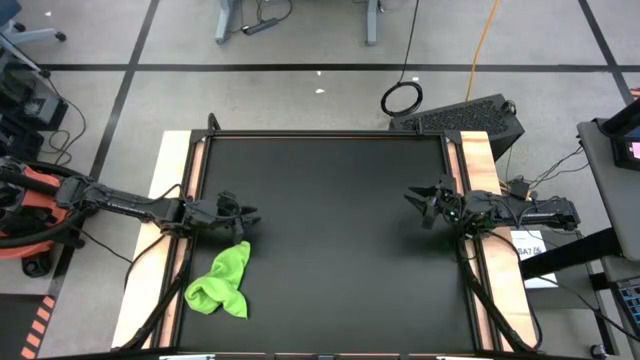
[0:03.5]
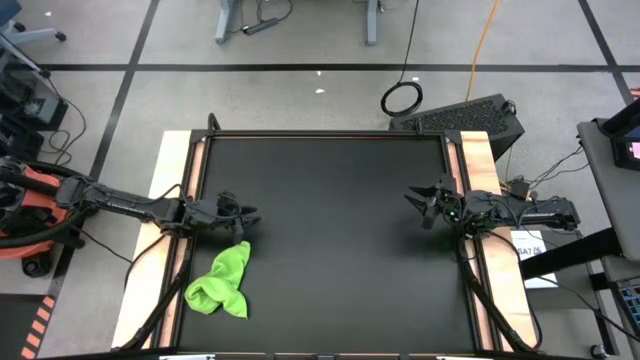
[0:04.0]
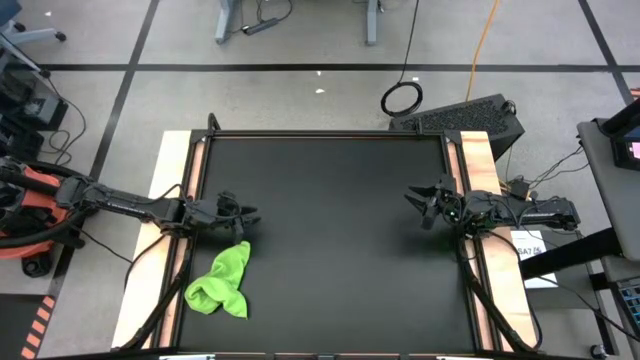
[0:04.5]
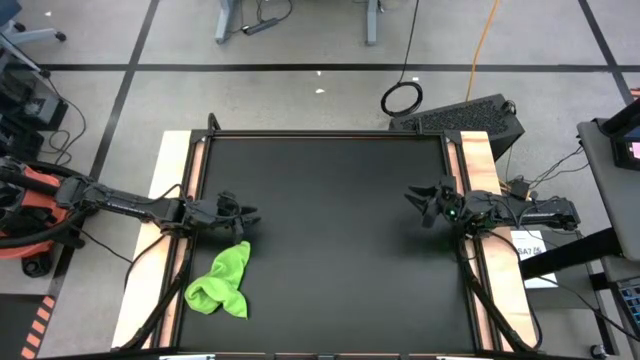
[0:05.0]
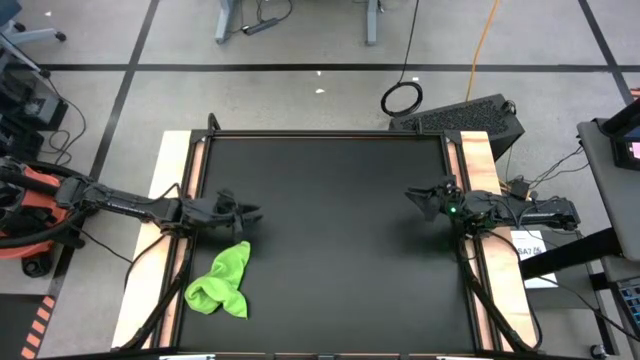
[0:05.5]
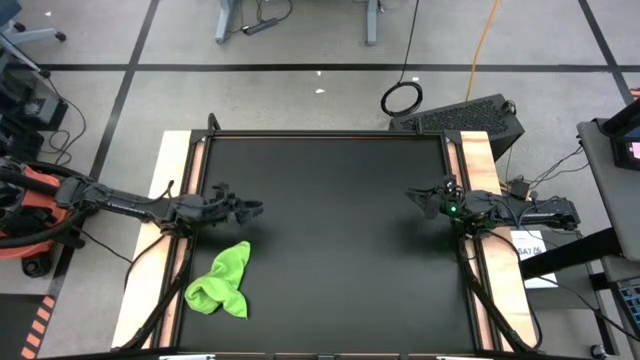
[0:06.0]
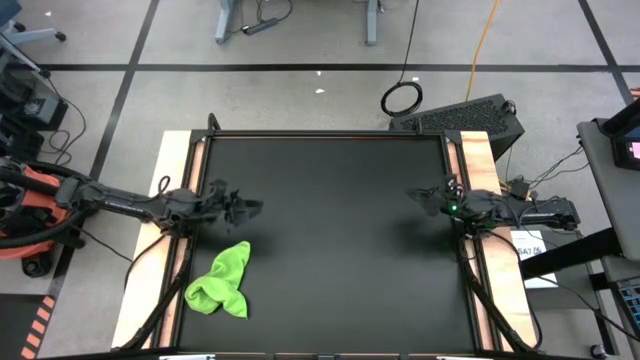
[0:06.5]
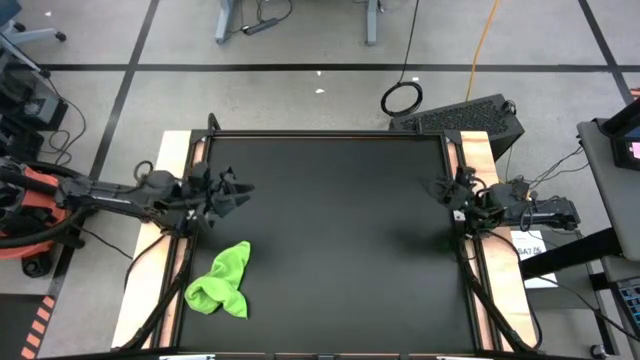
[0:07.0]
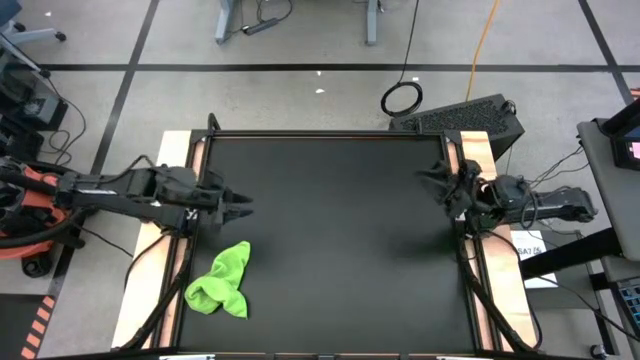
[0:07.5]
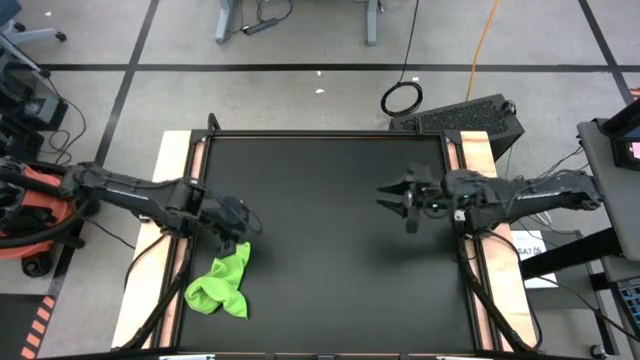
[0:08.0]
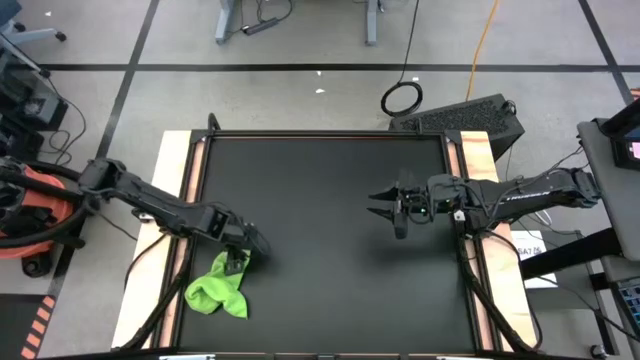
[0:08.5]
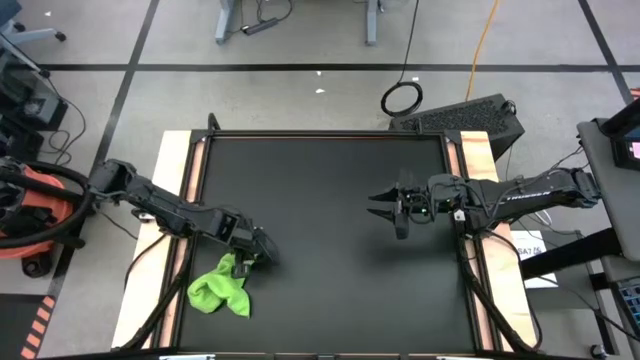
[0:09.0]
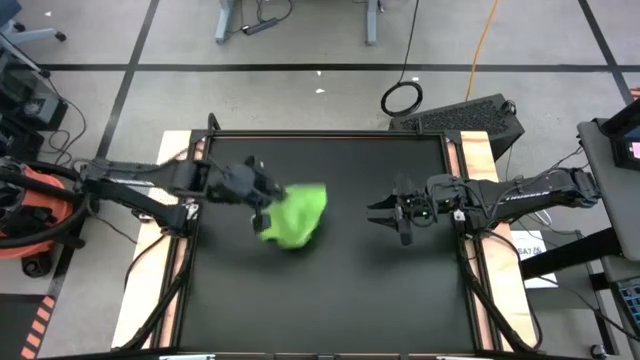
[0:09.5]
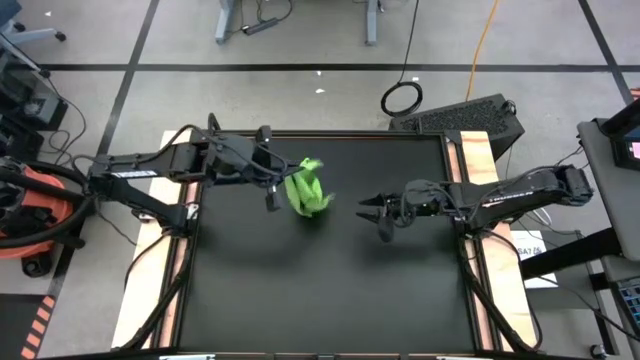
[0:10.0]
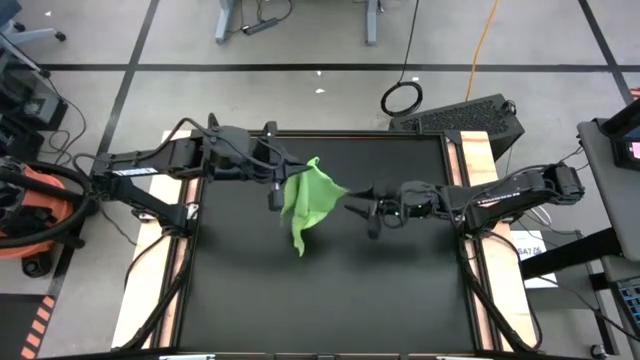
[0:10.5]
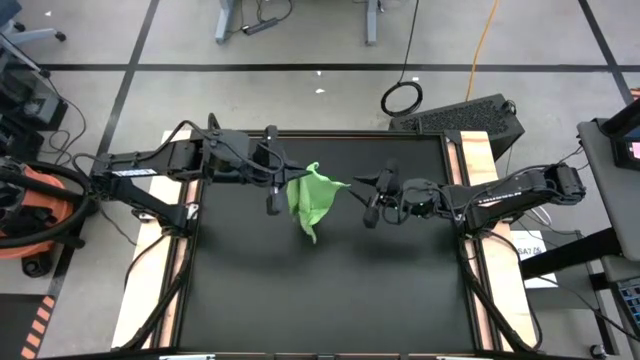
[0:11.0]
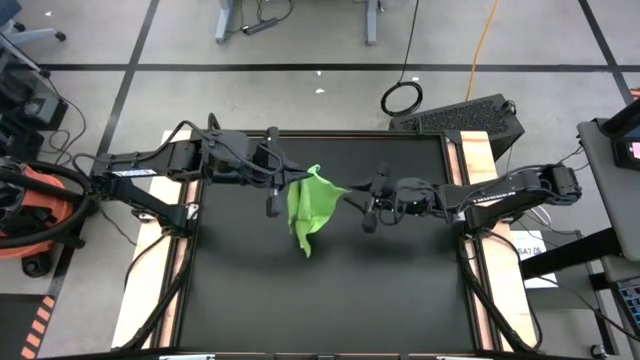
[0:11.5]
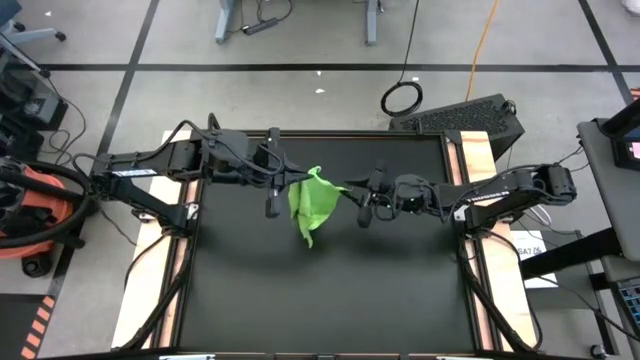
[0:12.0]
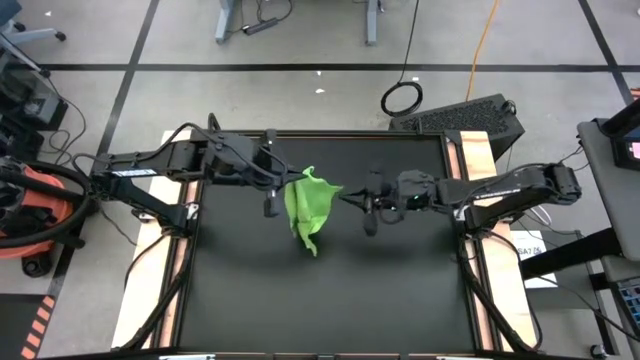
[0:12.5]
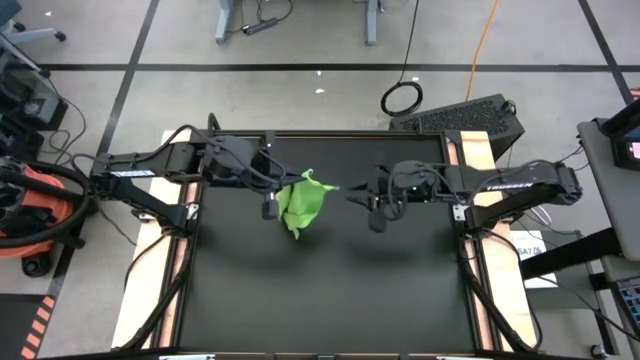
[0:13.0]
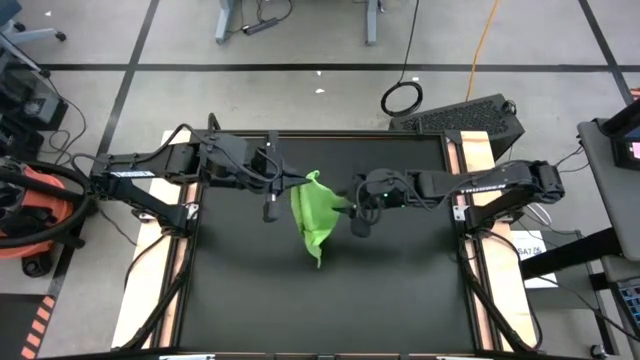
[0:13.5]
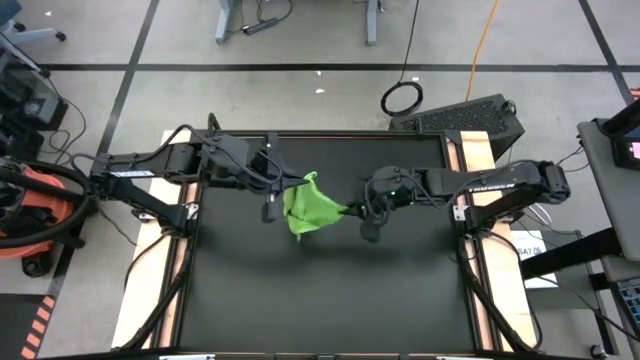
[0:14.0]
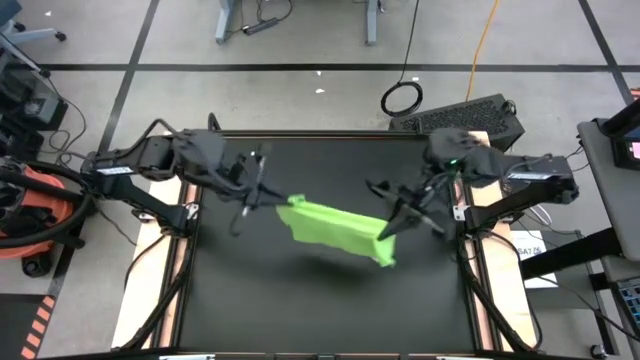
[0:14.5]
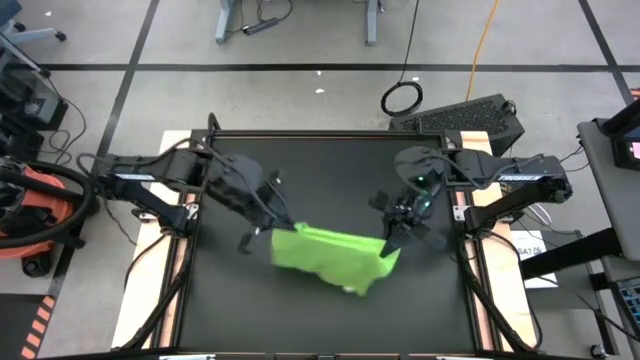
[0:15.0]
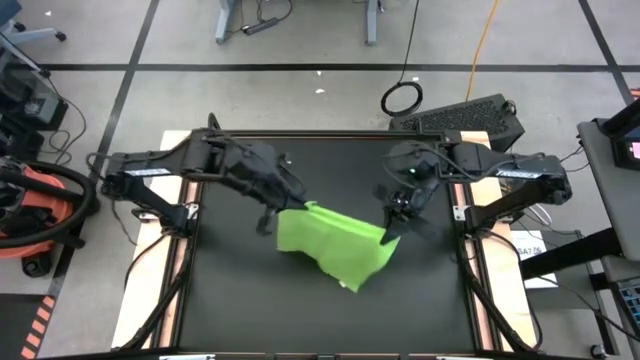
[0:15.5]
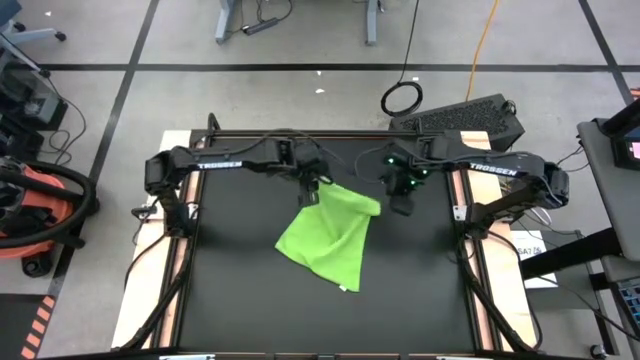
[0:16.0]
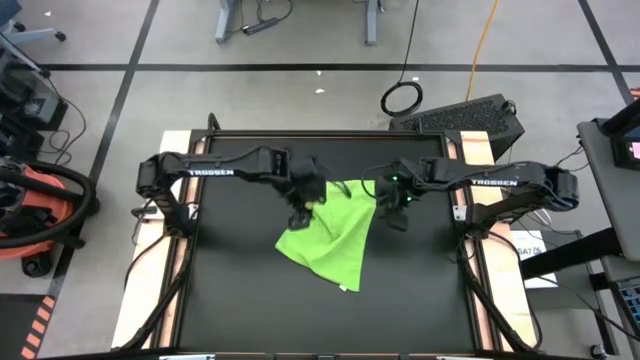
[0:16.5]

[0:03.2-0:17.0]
Task: Roll towel
Fold the green microfiber cloth
